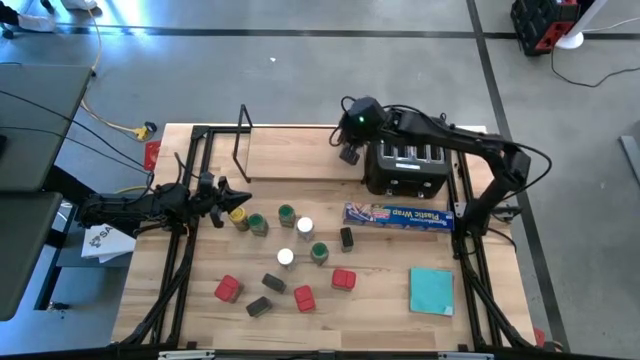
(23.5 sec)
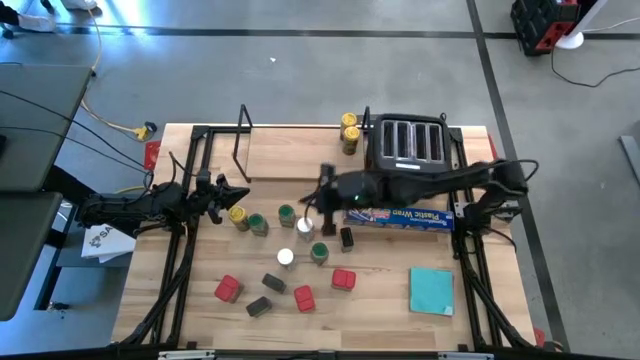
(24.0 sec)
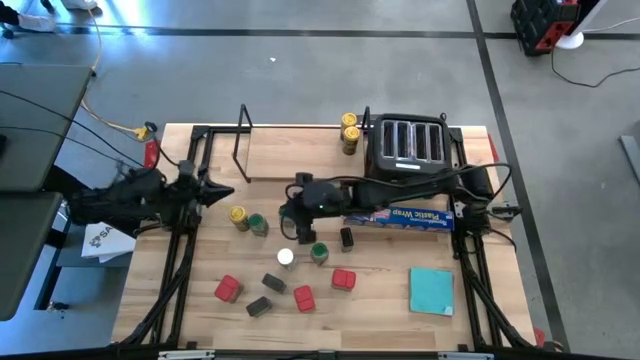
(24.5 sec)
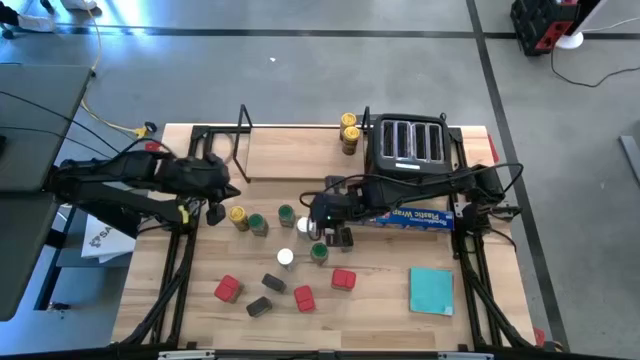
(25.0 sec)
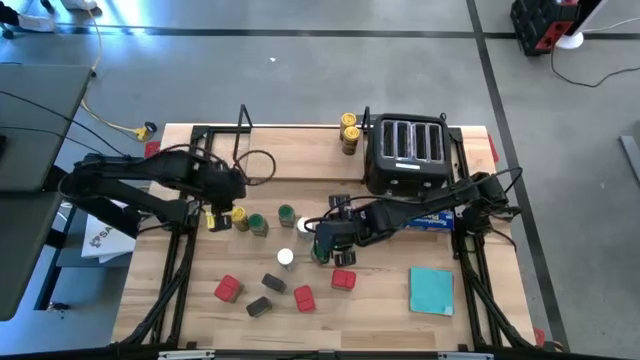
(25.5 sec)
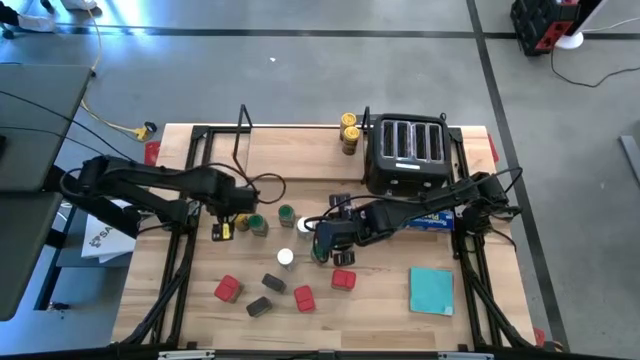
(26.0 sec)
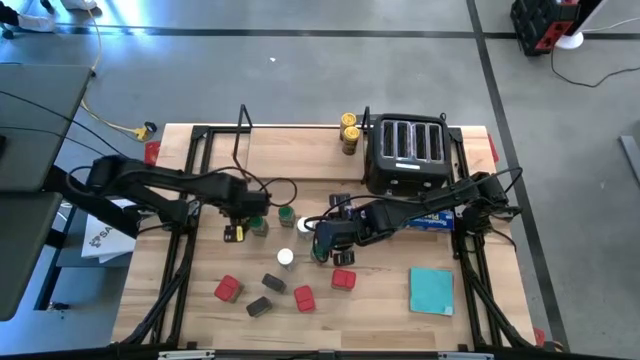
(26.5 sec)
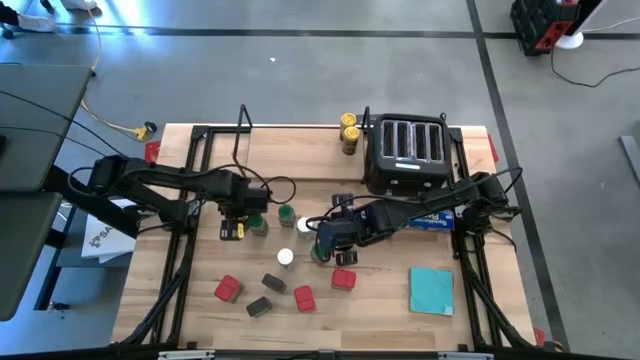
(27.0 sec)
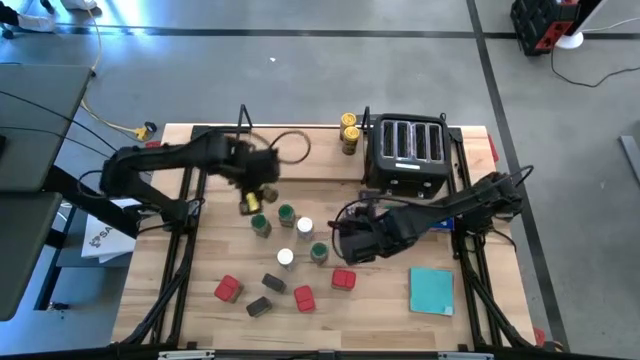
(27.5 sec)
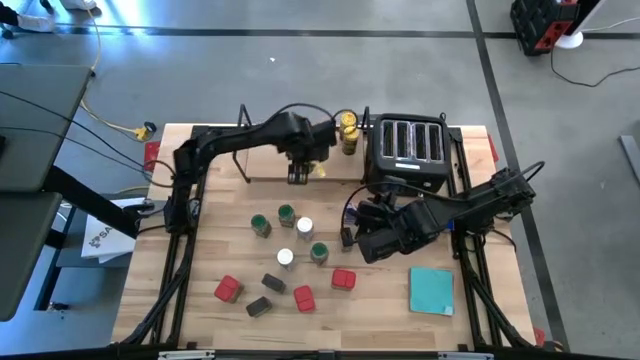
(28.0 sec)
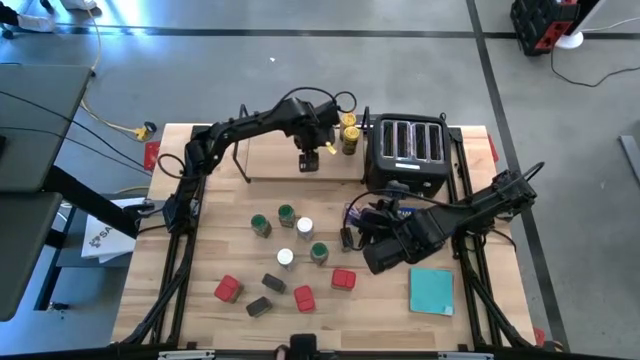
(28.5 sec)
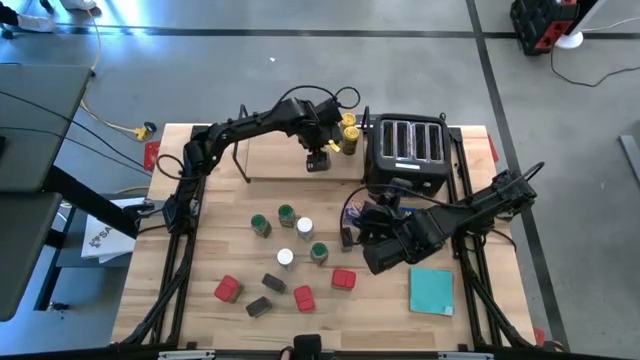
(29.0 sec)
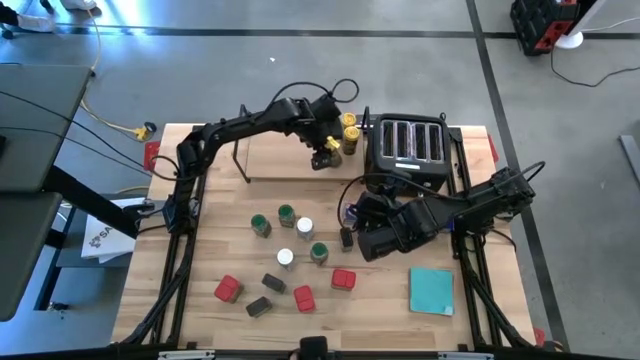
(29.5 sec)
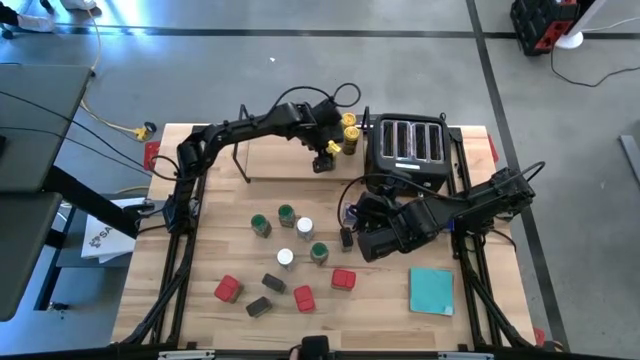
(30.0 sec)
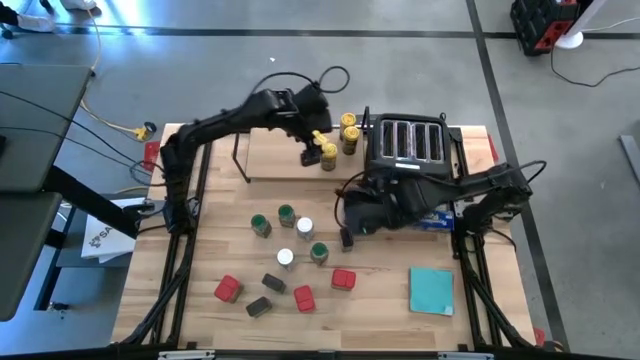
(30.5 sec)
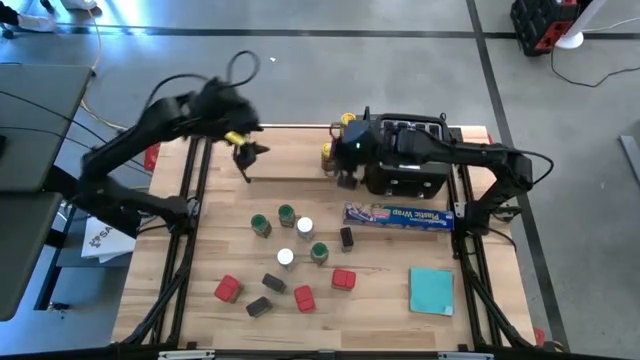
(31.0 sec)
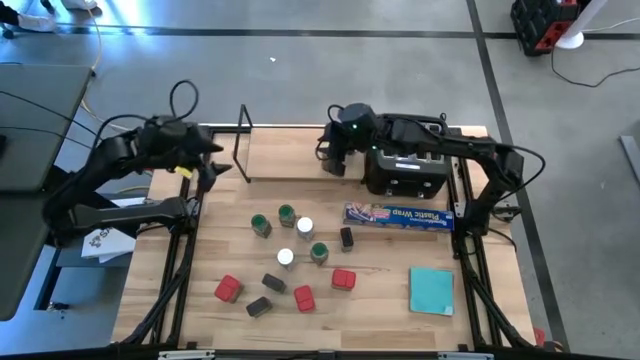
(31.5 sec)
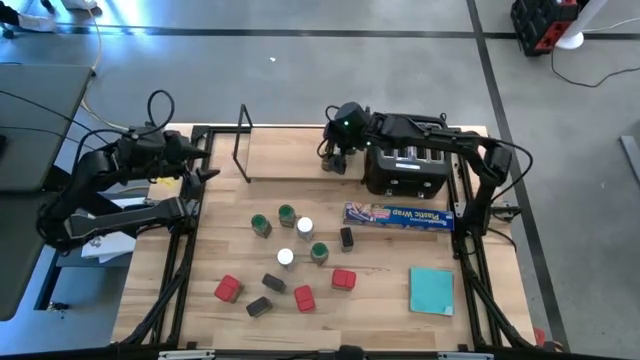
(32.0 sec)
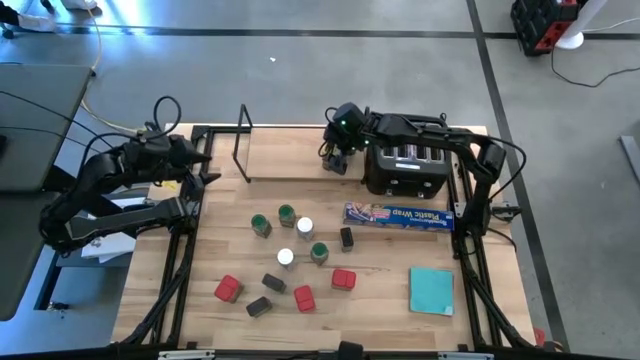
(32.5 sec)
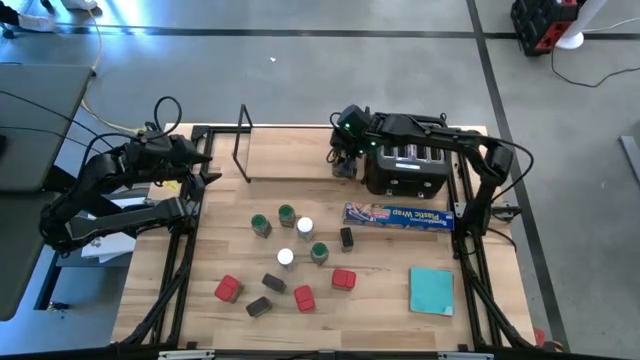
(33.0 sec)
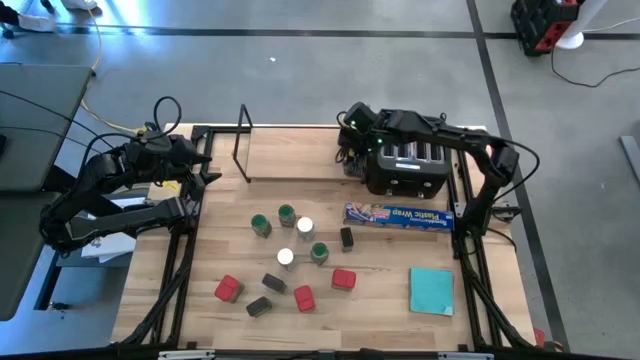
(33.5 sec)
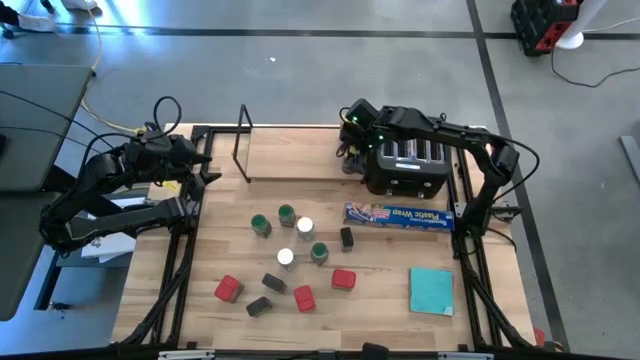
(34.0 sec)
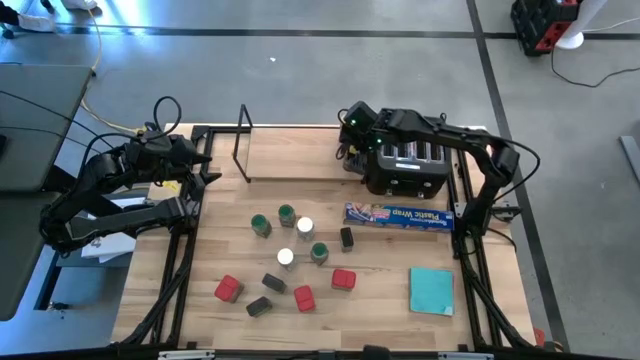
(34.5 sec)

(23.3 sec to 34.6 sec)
Task: Shelf spices
Put the yellow seasoning bottle on the shelf aligned with the other yellow seasoning bottle

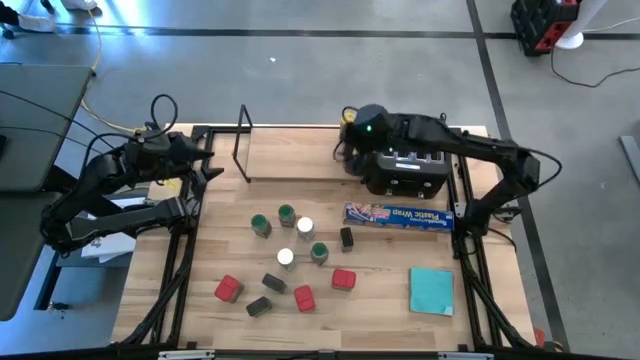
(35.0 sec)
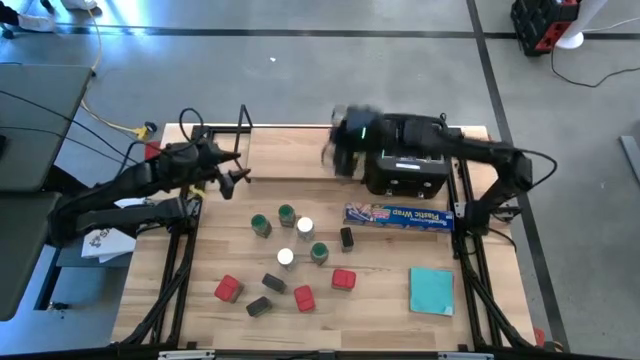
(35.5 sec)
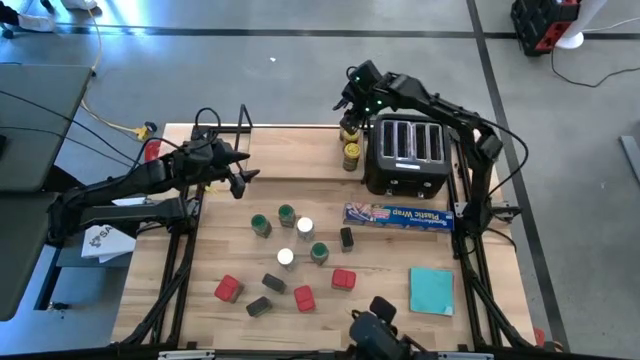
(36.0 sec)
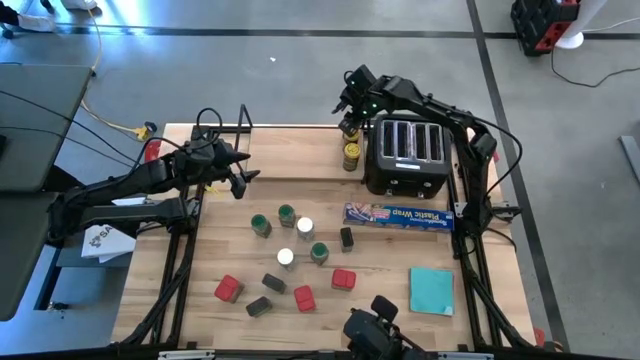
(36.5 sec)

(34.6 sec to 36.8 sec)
Adjust the yellow seasoning bottle on the shelf

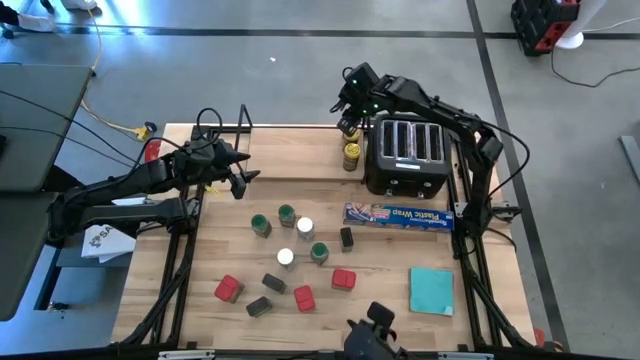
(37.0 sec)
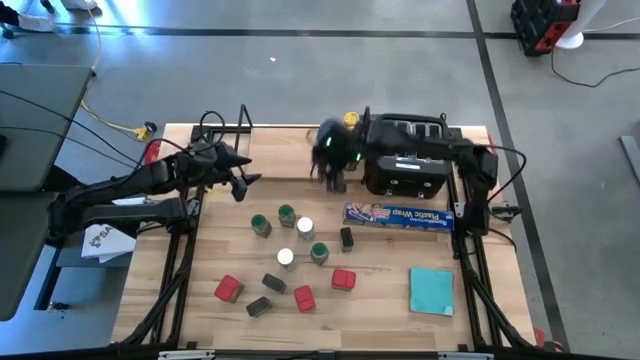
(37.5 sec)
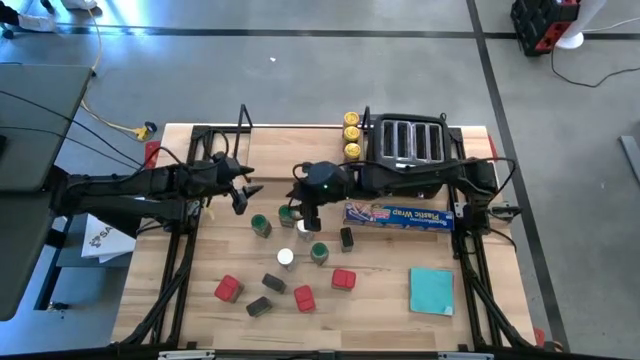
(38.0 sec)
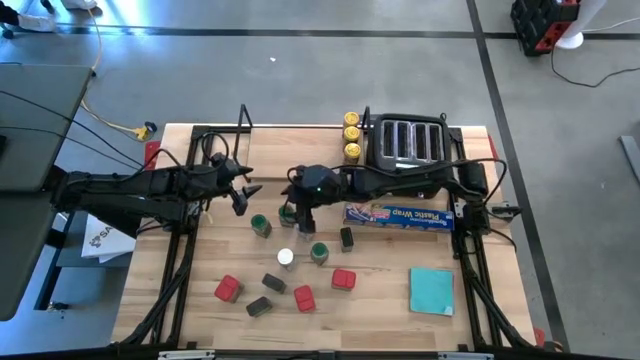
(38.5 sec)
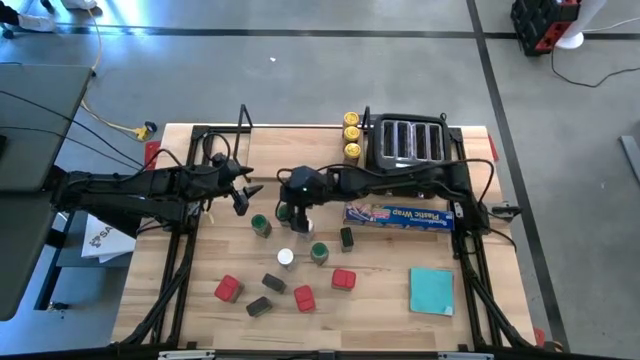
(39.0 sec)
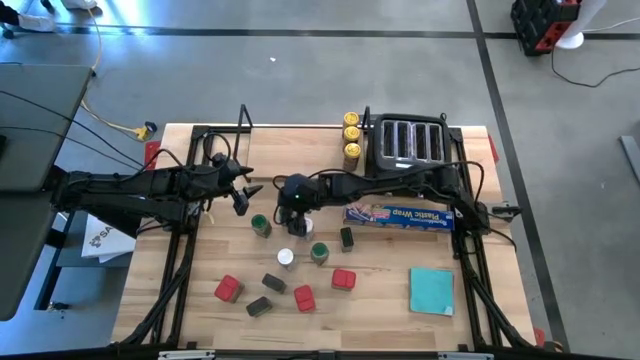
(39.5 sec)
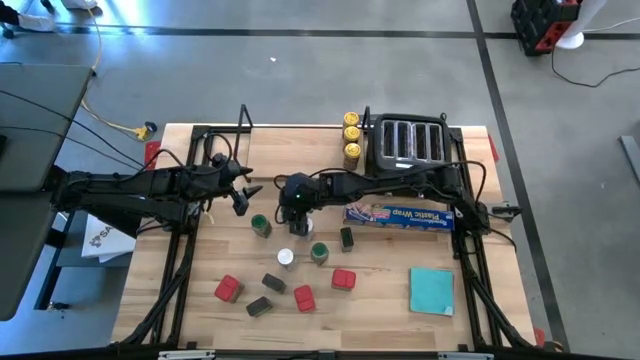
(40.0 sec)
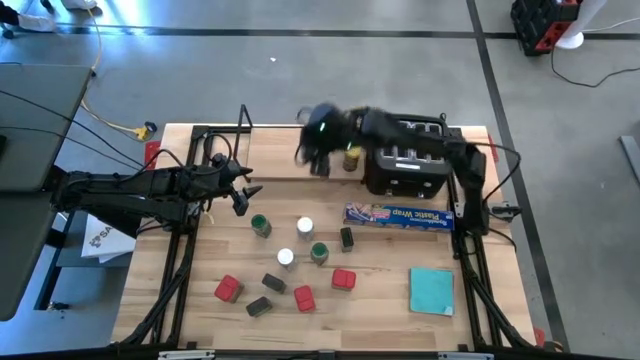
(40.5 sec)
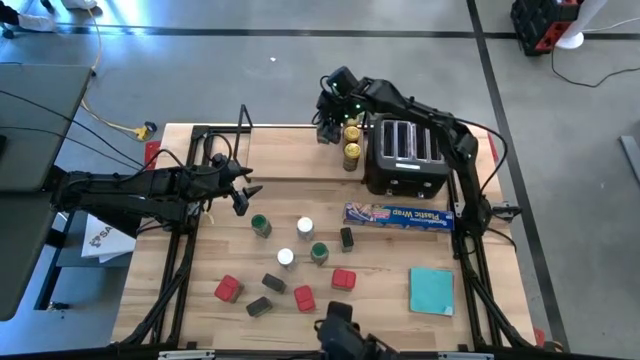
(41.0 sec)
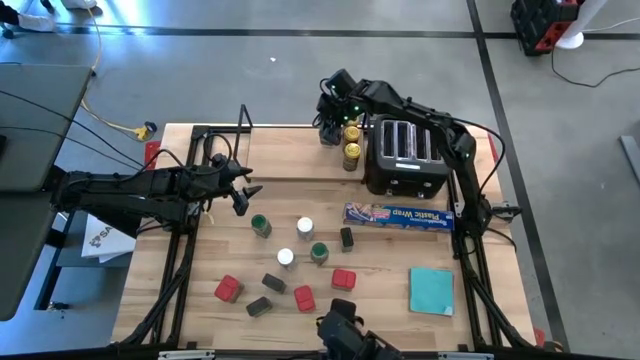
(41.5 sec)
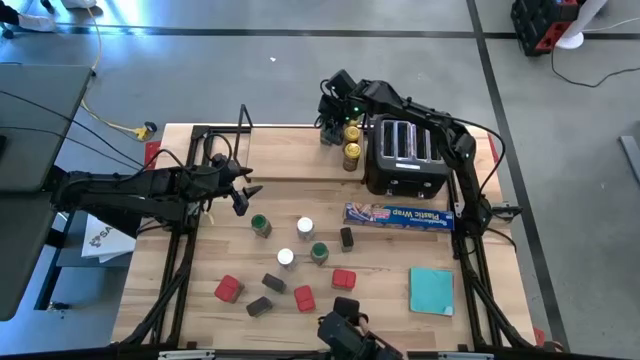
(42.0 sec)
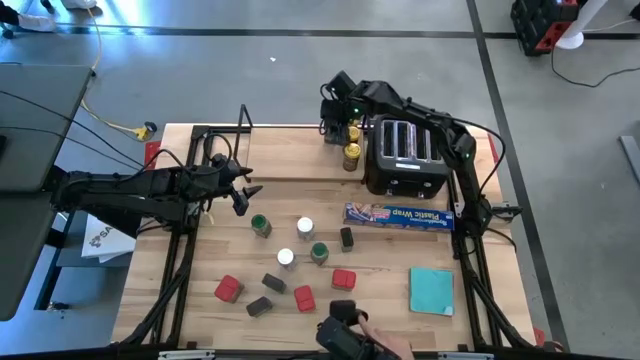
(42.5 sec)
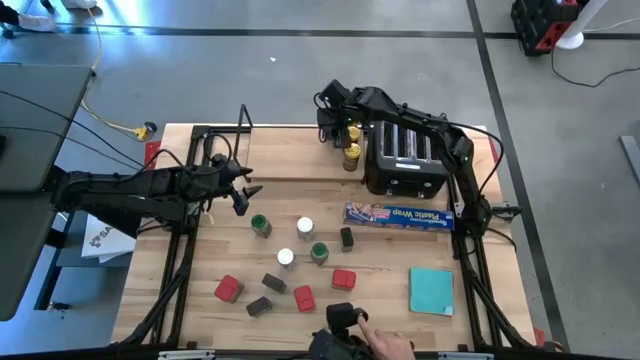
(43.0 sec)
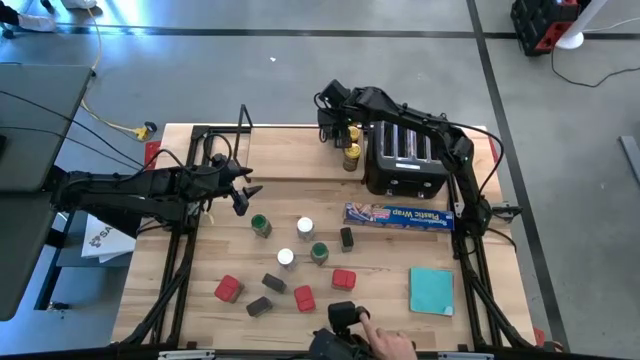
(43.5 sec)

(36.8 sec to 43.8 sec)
Put the top right green seasoning bottle on the shelf
